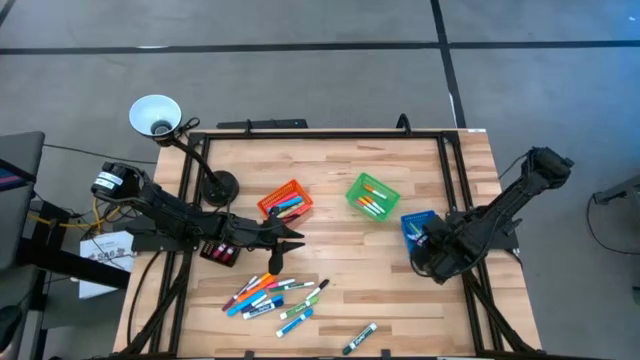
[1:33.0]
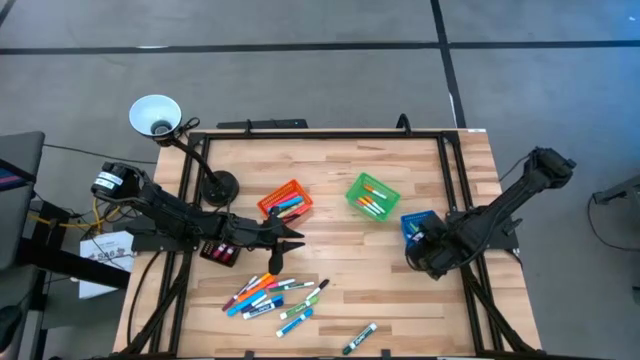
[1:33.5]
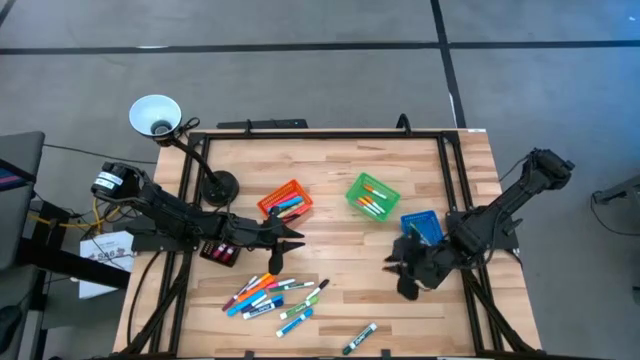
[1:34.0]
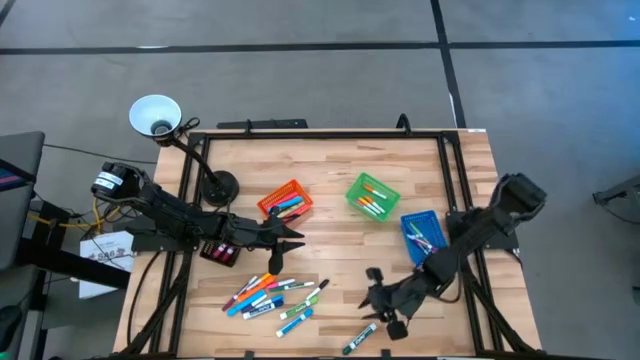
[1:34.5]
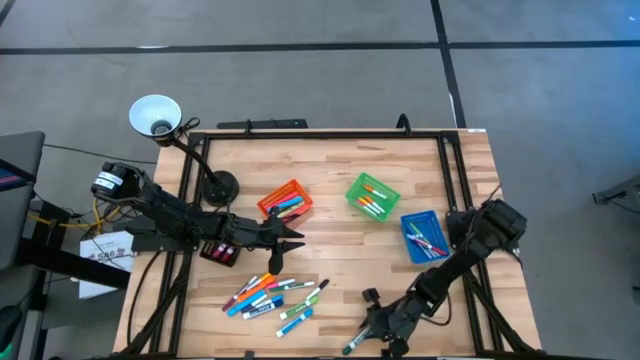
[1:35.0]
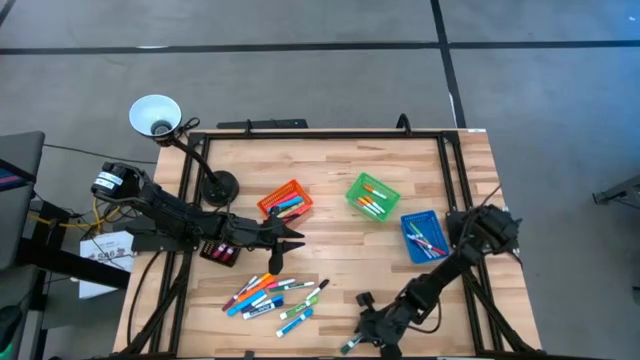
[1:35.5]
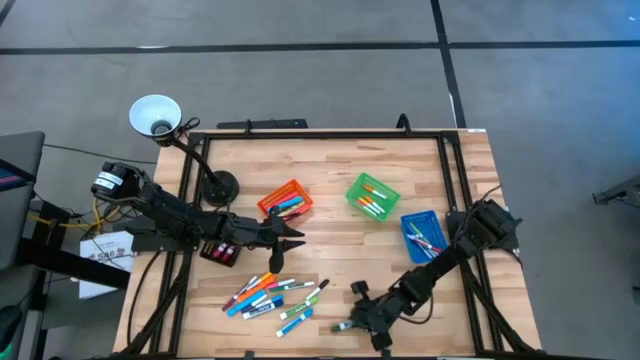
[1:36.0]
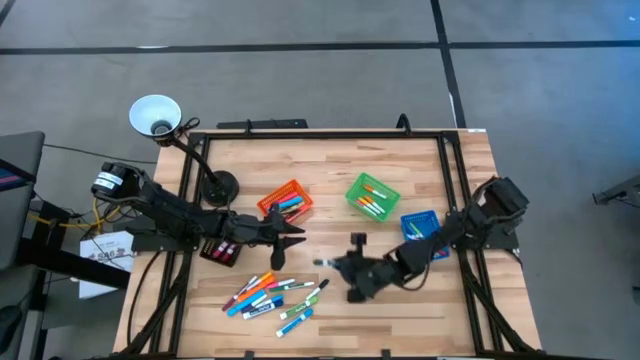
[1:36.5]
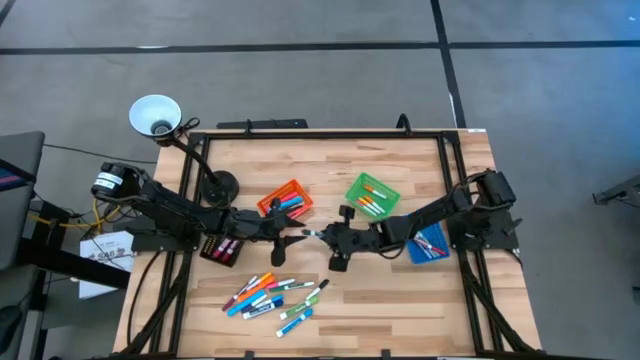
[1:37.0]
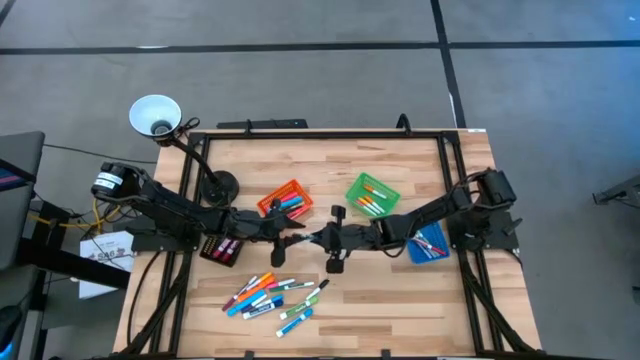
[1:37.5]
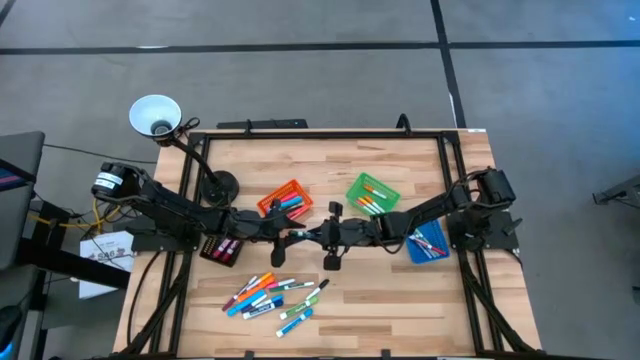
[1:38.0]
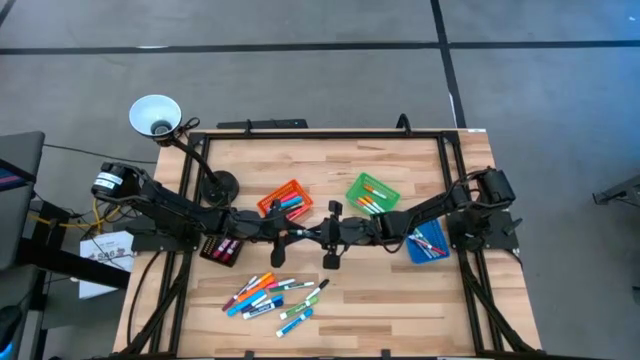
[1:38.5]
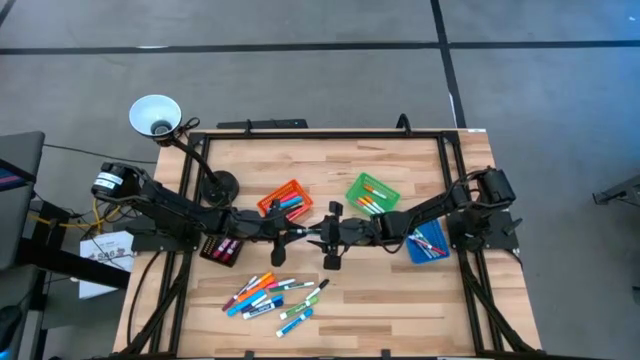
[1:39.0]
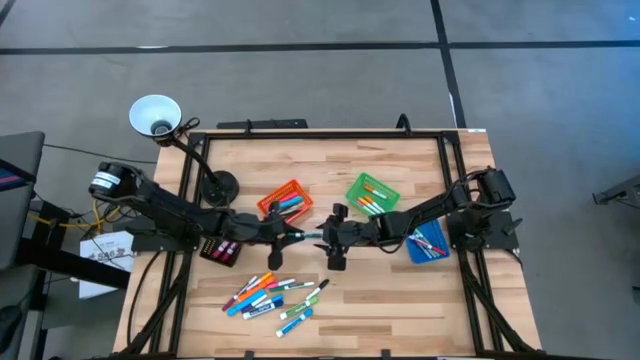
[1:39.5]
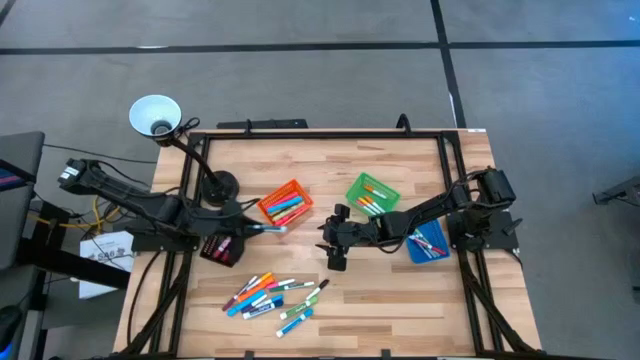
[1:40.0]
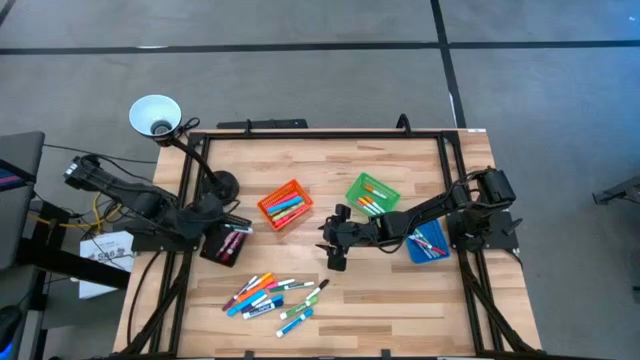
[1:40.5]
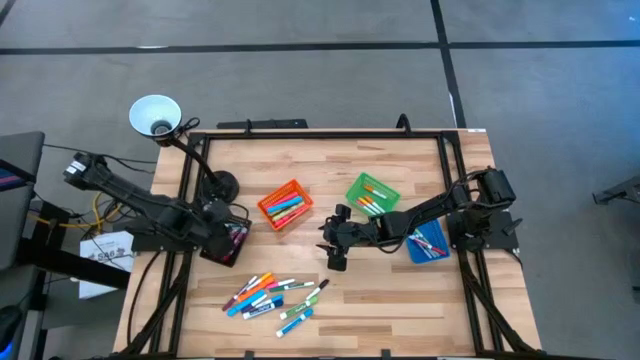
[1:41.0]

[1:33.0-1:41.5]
Task: Pick & Place Markers
Put the dark green marker pen into the black bin

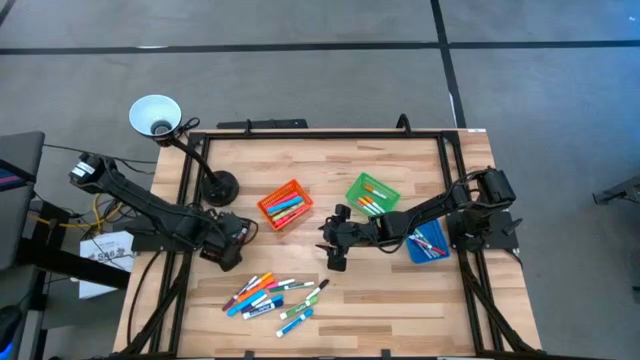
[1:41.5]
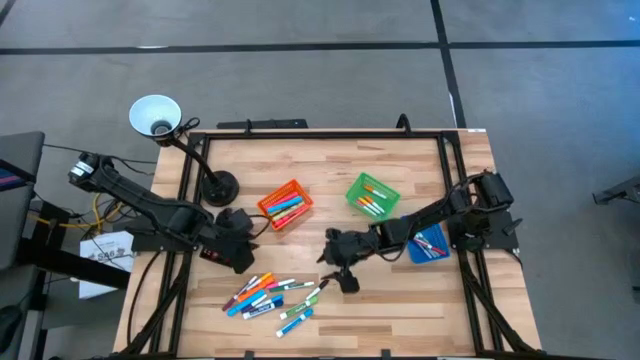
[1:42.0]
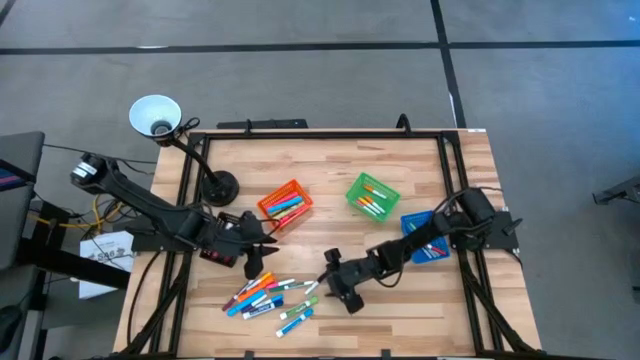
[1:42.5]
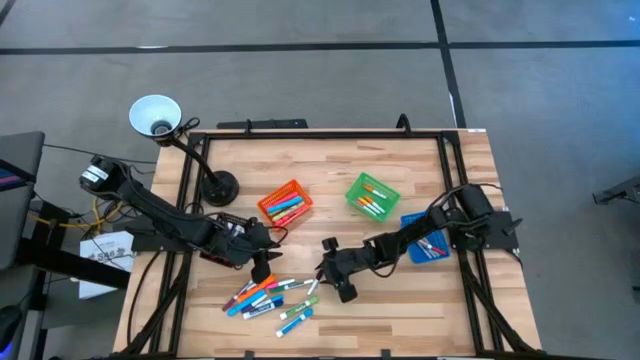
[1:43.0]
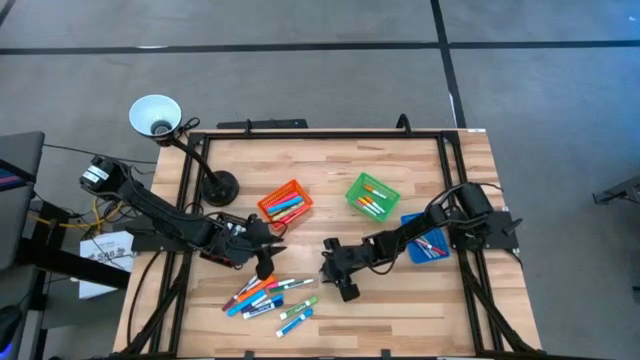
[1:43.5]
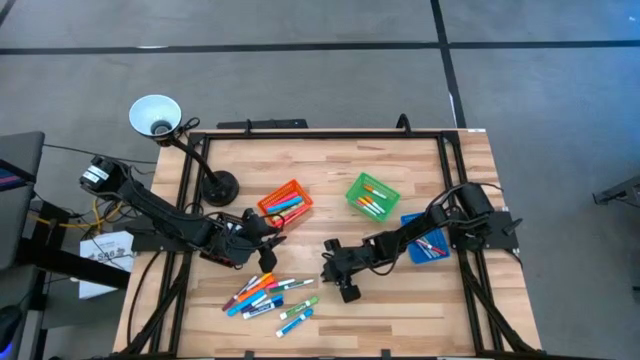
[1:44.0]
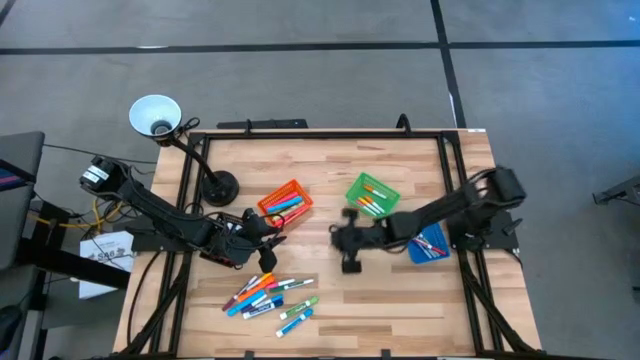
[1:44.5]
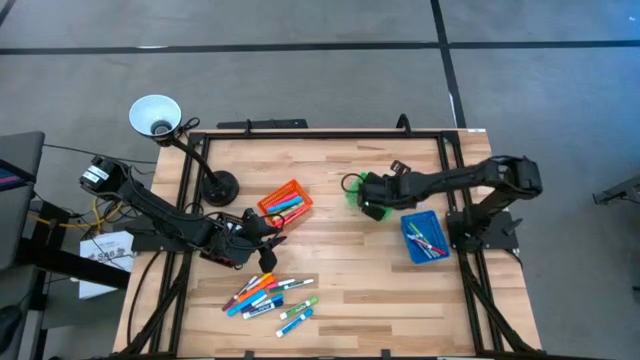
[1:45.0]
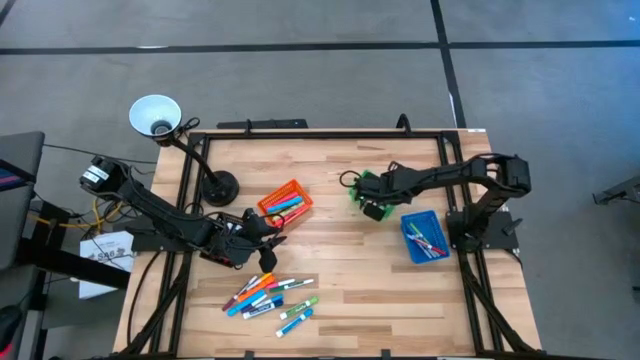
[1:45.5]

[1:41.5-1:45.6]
Put the black pen into the green bin

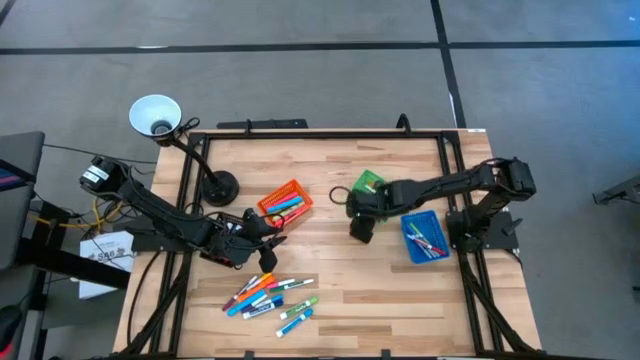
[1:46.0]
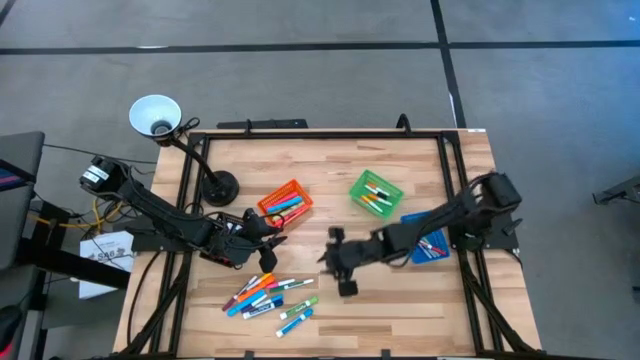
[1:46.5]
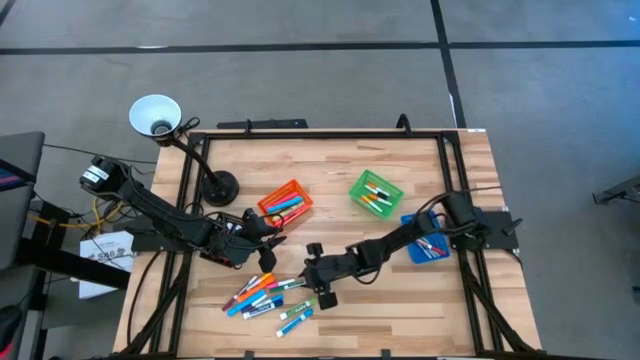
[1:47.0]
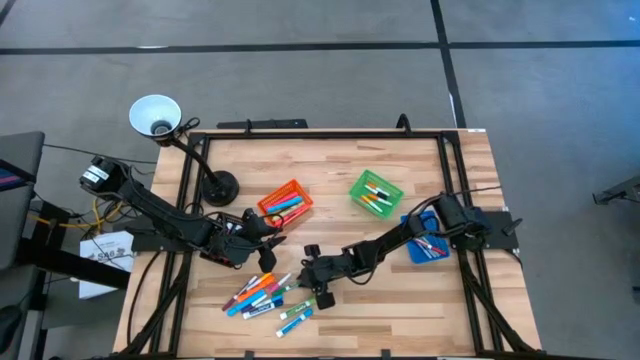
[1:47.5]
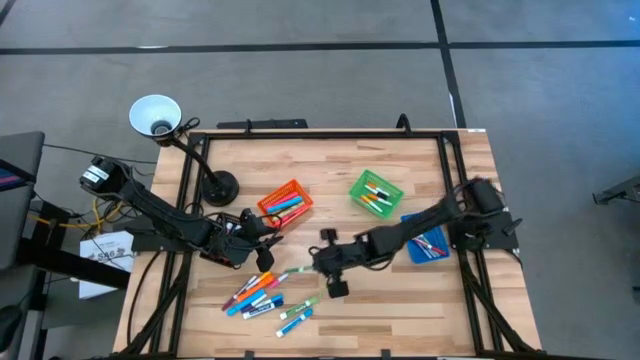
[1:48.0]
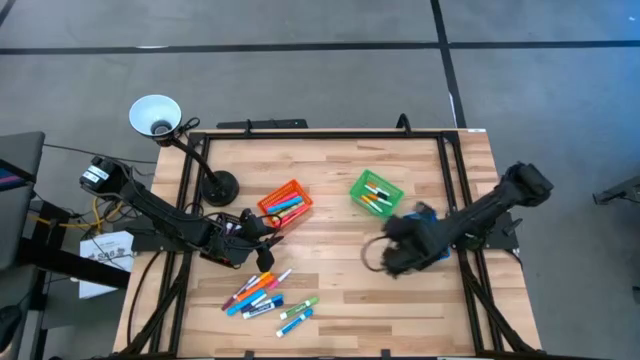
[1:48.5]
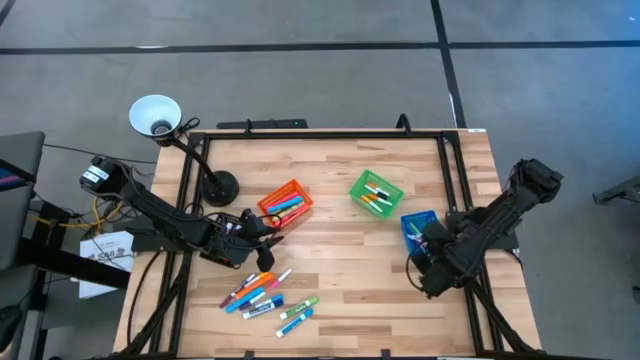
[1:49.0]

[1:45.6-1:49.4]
Put the dark green marker pen into the blue bin

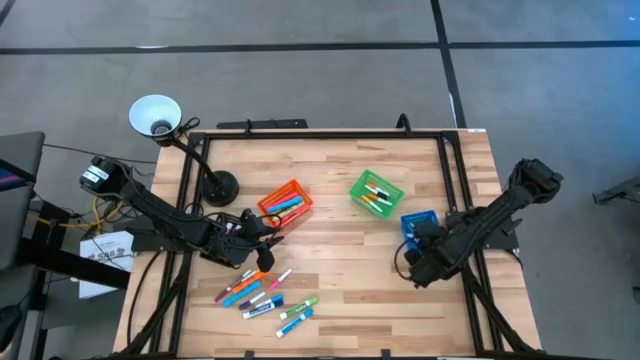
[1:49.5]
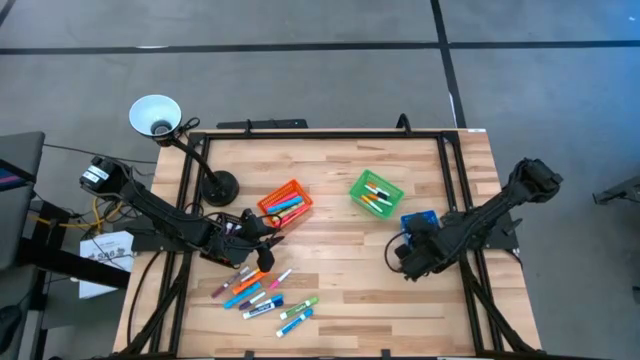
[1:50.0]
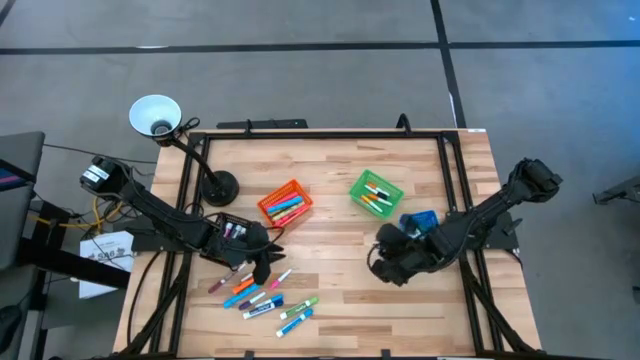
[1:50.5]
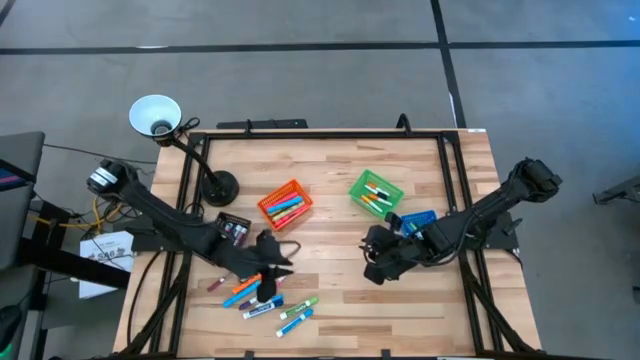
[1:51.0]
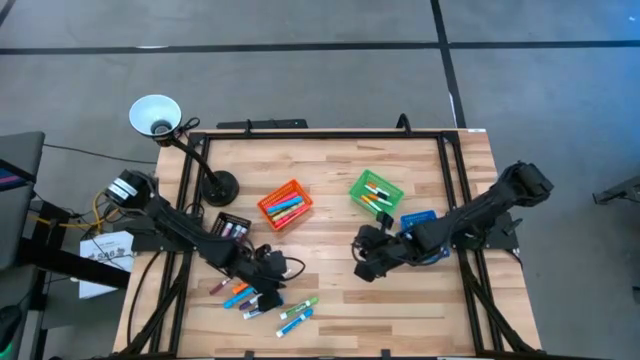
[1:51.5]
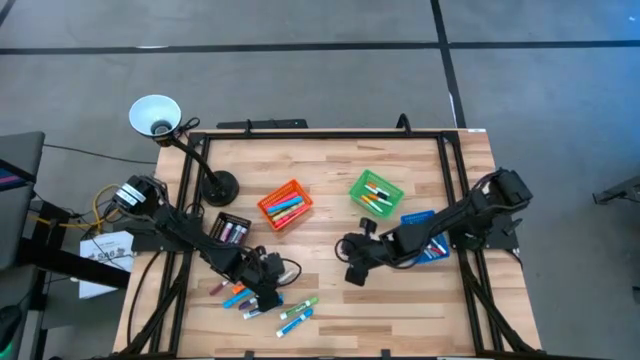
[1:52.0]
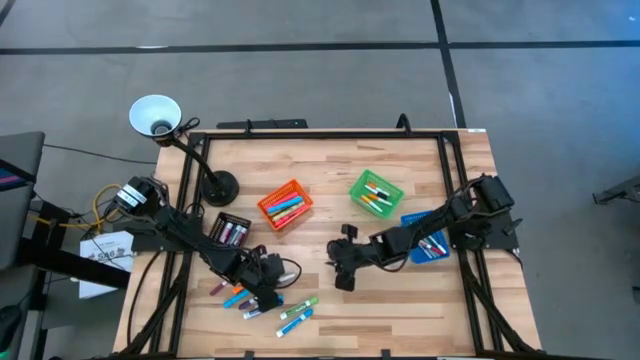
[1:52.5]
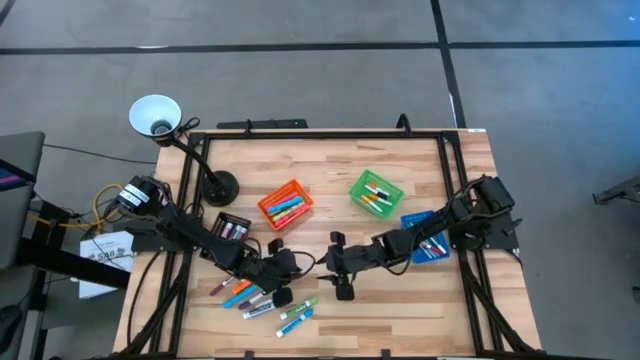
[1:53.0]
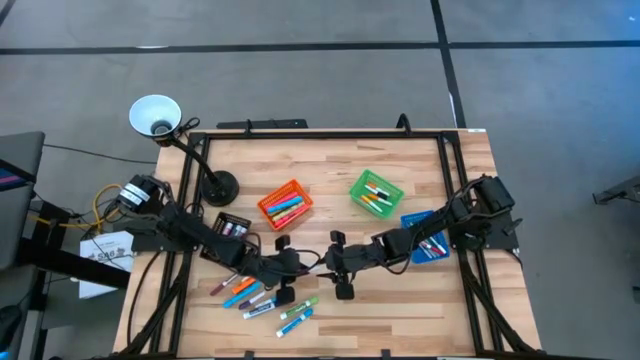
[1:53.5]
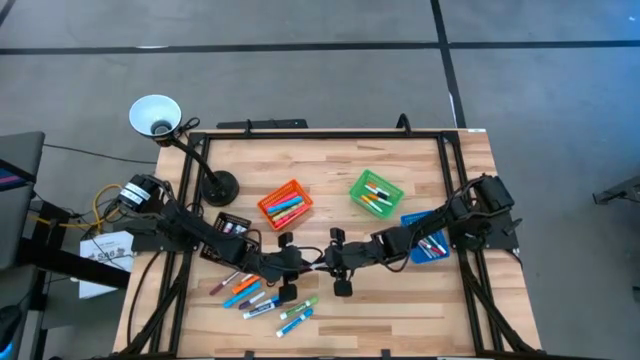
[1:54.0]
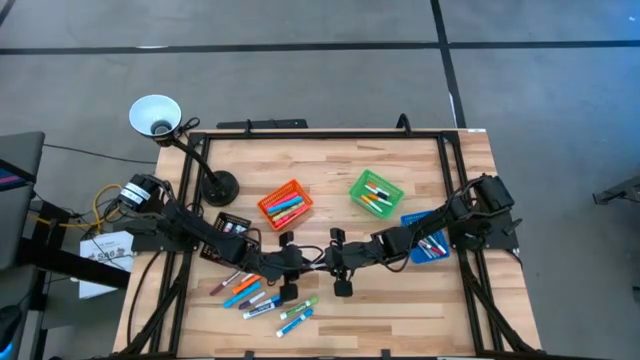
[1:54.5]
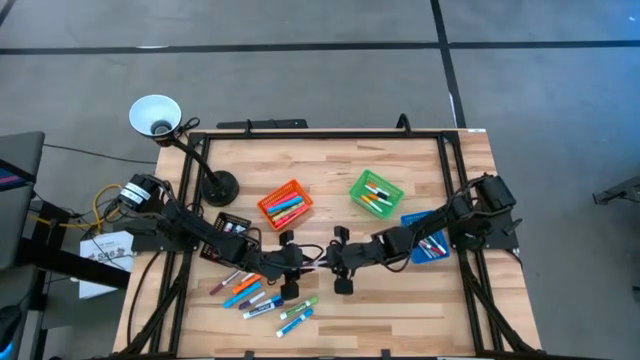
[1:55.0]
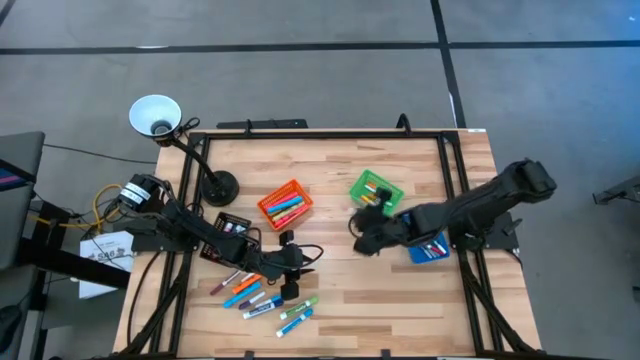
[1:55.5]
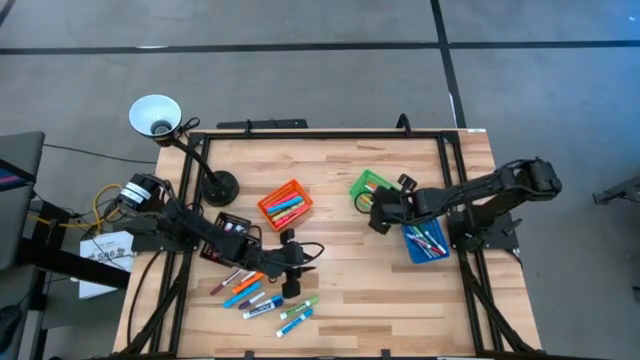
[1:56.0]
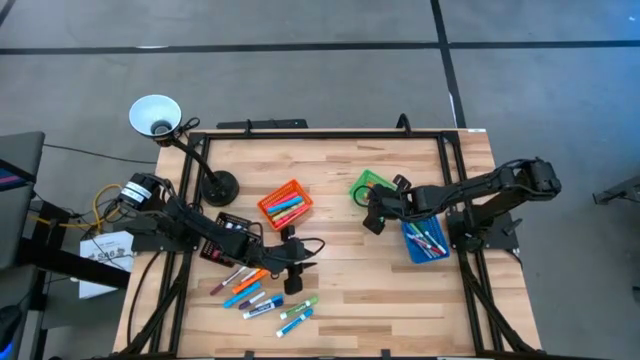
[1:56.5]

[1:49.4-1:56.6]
Put the pink pen into the green bin
